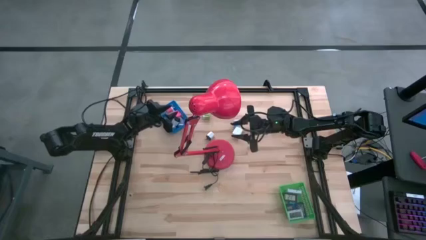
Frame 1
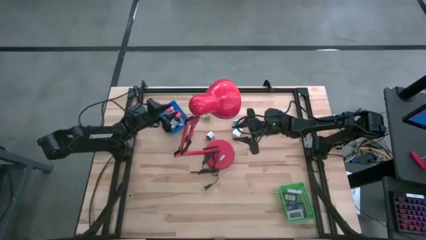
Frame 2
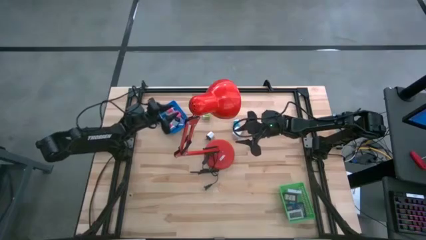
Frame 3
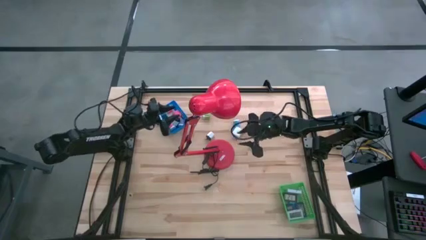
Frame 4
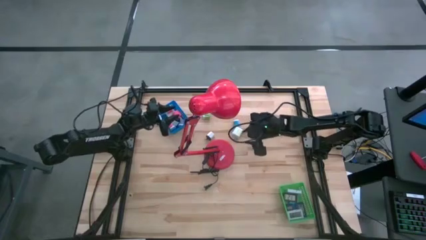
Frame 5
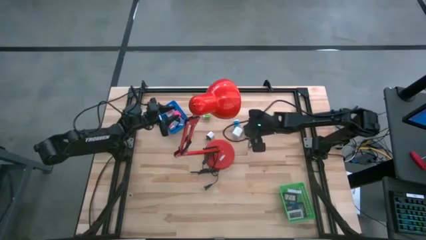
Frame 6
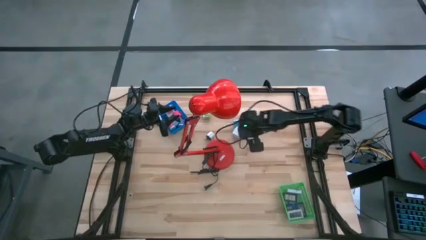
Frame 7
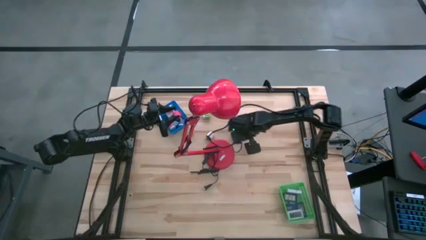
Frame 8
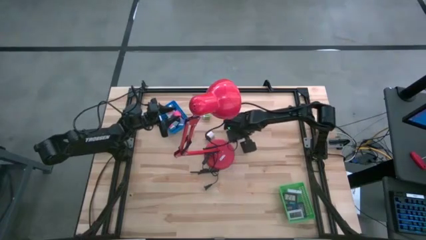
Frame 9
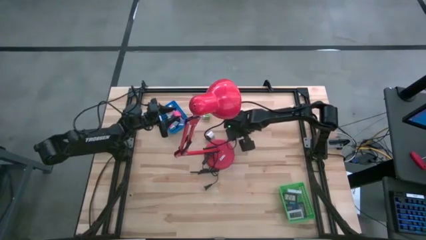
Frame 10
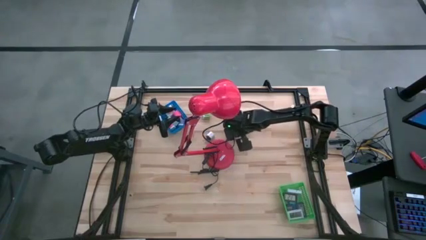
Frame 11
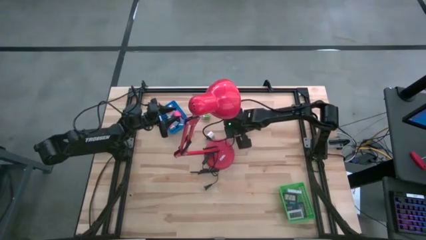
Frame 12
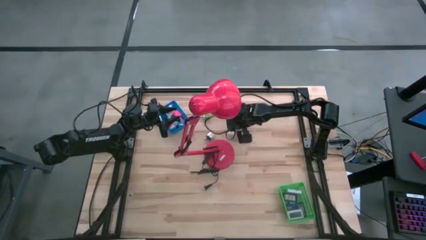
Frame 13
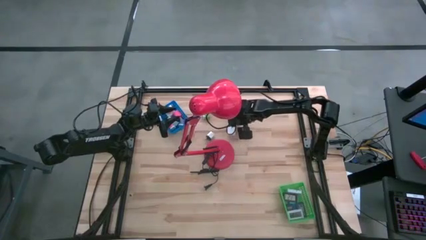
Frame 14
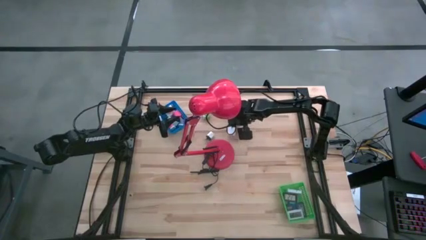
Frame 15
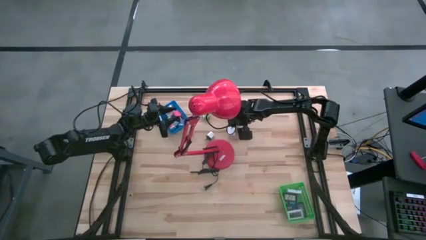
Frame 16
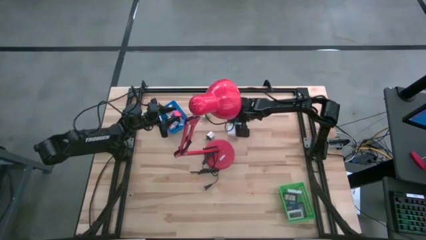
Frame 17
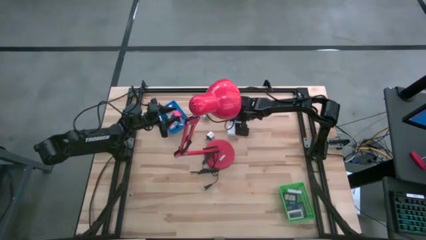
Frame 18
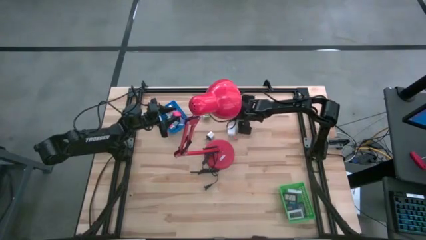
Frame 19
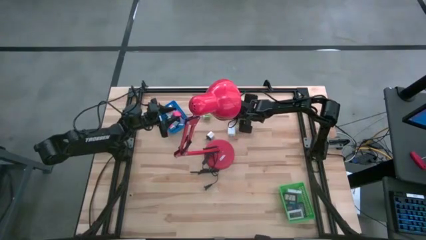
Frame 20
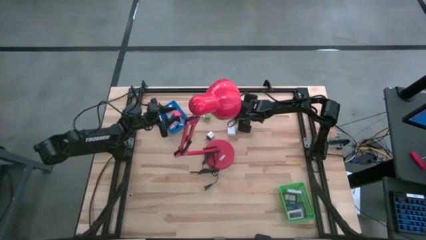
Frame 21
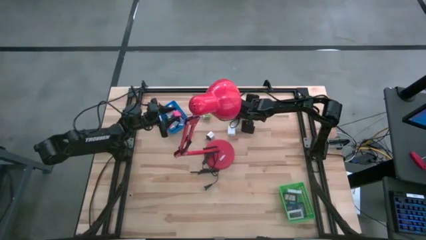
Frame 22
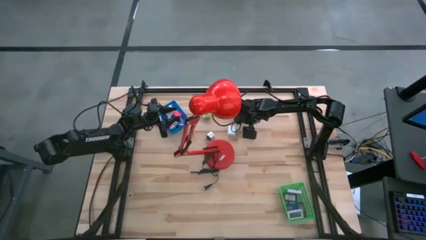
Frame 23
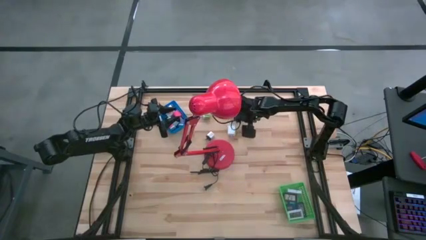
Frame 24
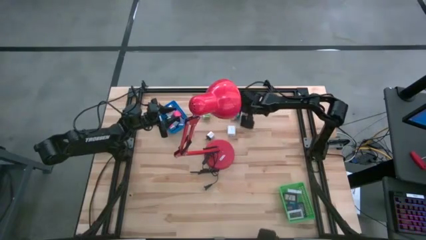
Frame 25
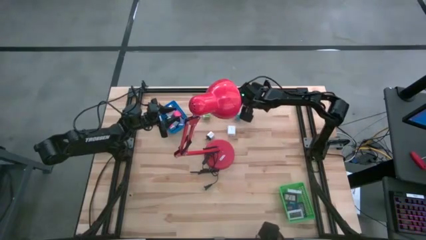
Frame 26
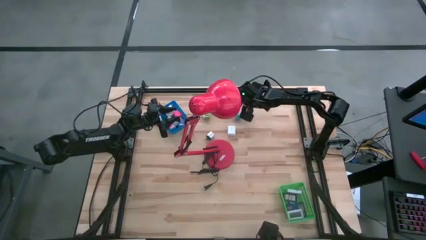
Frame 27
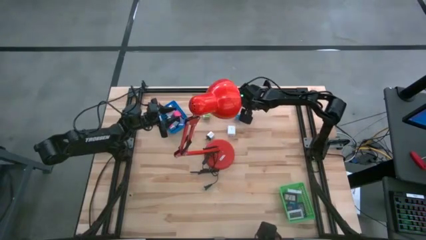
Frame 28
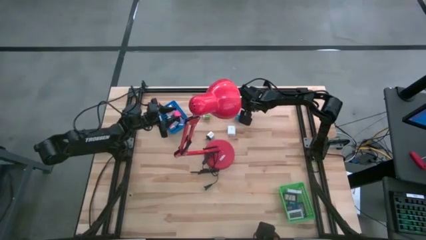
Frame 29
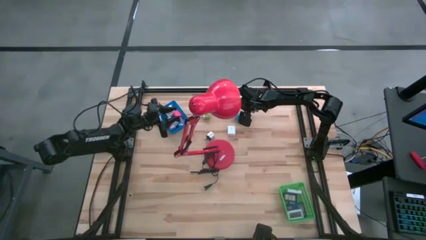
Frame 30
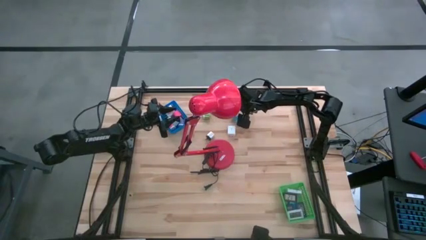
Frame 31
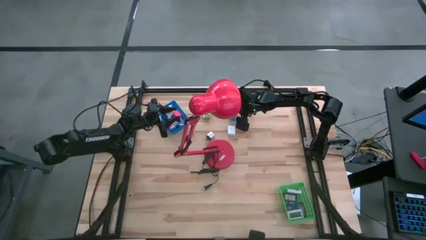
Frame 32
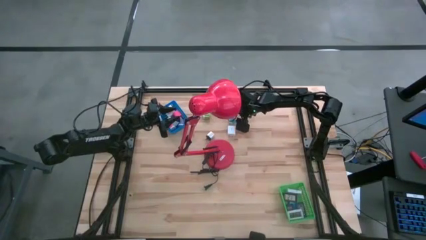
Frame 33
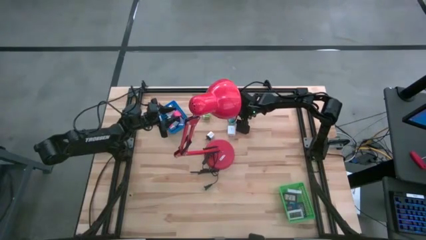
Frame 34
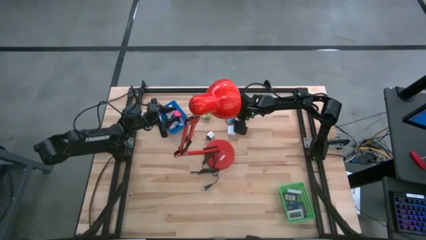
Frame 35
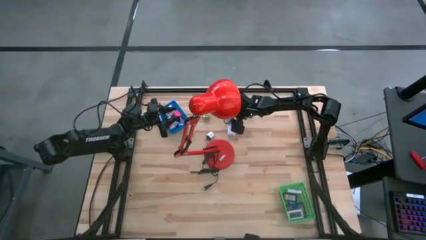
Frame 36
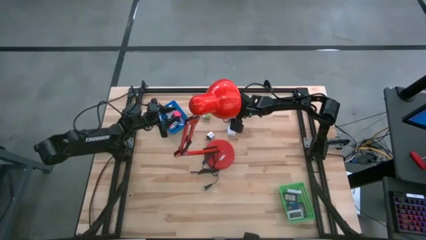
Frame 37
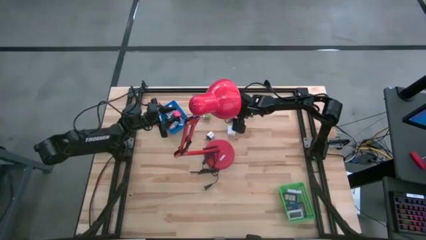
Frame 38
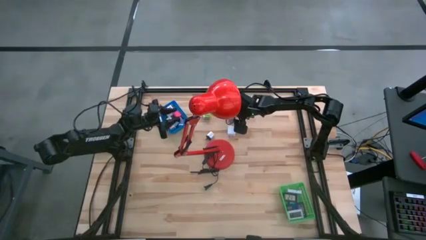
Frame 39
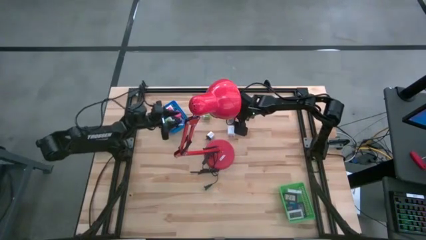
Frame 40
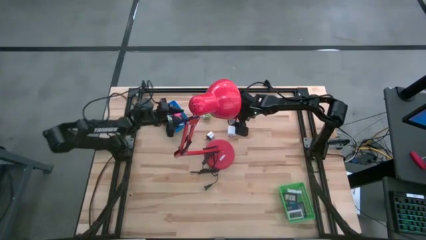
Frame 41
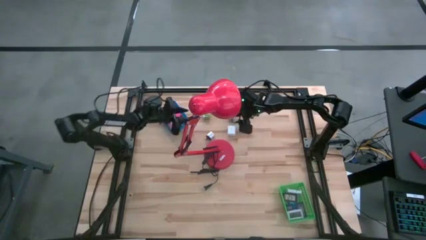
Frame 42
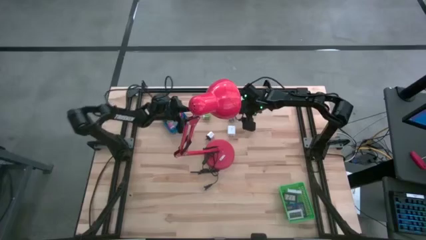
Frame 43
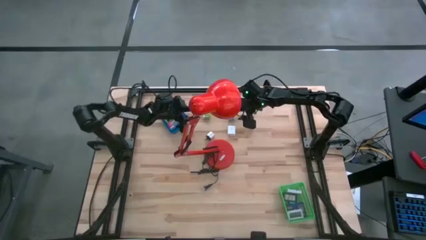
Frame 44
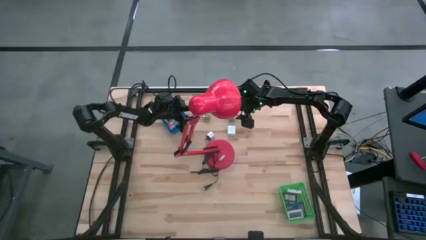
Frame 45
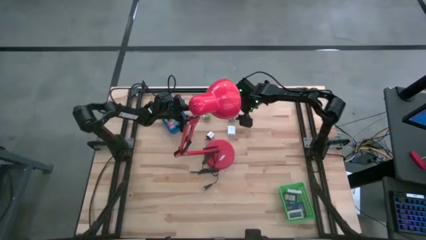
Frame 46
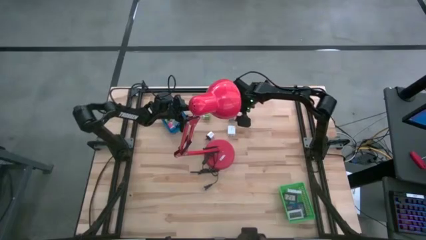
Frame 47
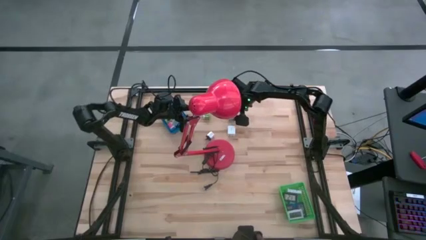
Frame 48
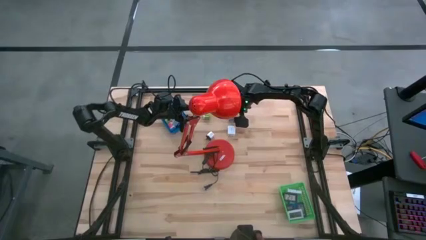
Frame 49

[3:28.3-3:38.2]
Task: Pick & Place Office items
Put the light blue charger adapter into the blue bin
